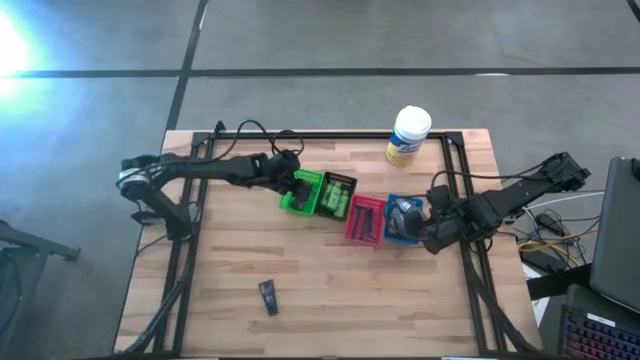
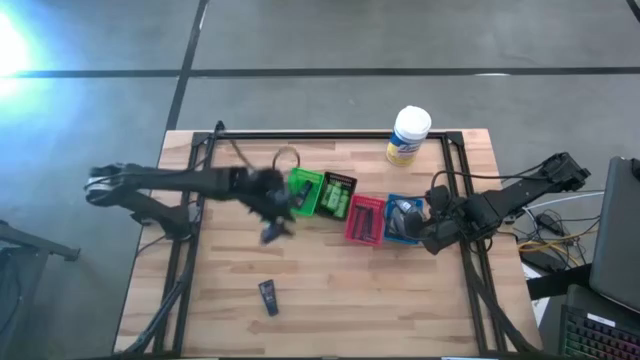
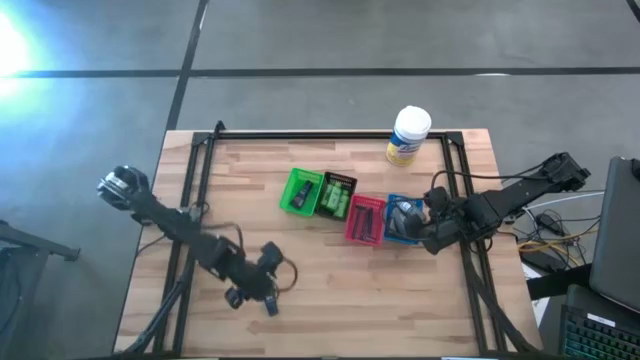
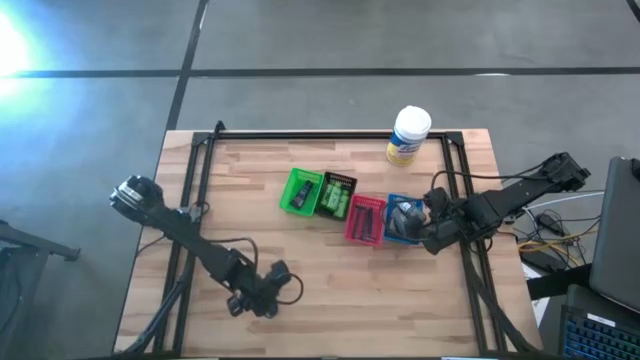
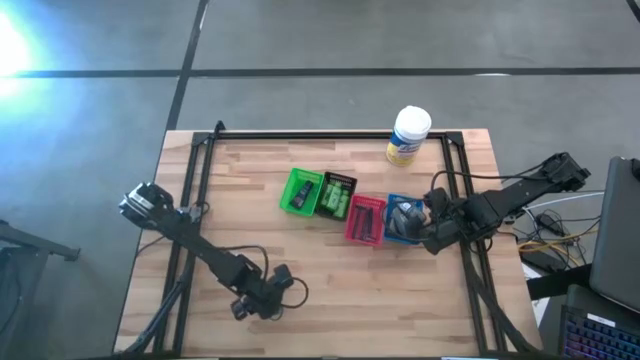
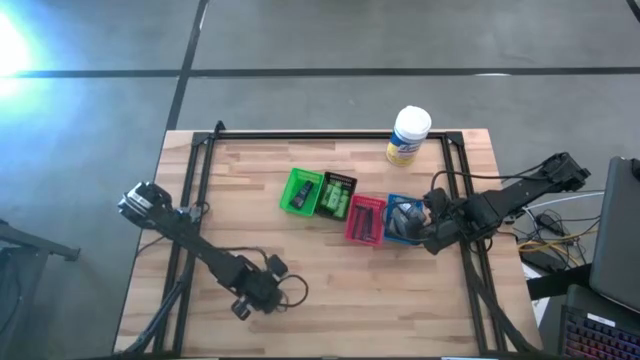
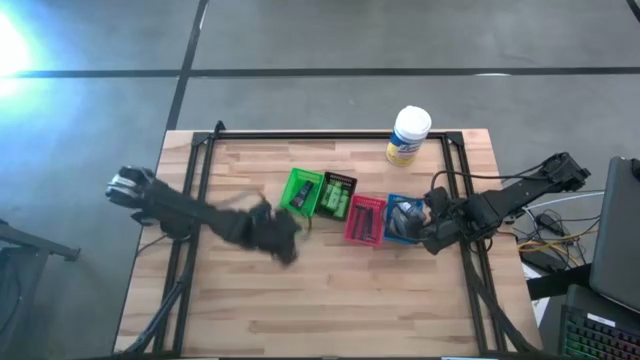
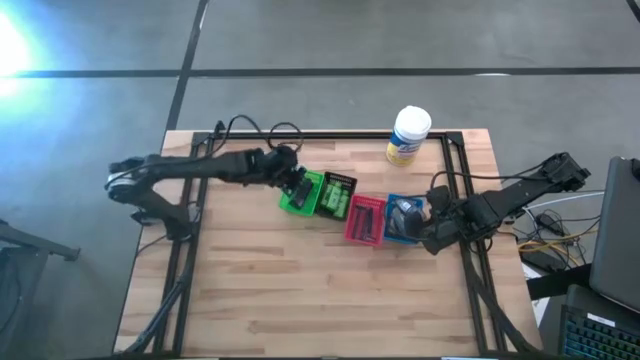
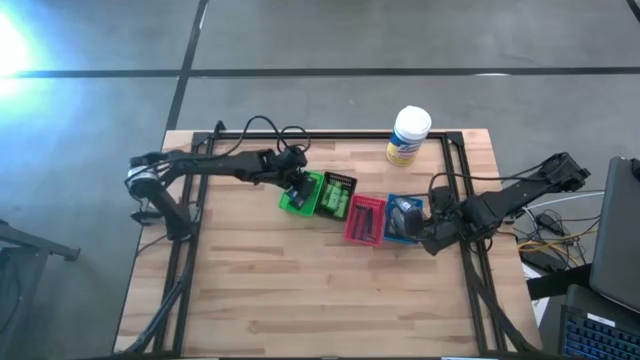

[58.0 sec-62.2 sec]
Task: Pick & Place Travel size toiletries
Put the shave cream into the green bin

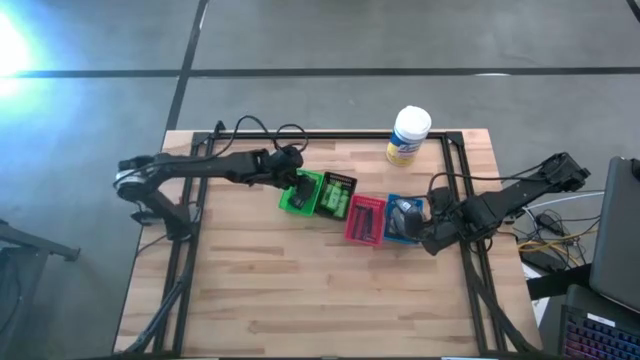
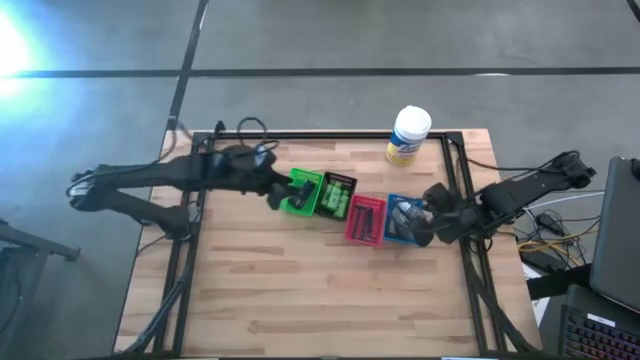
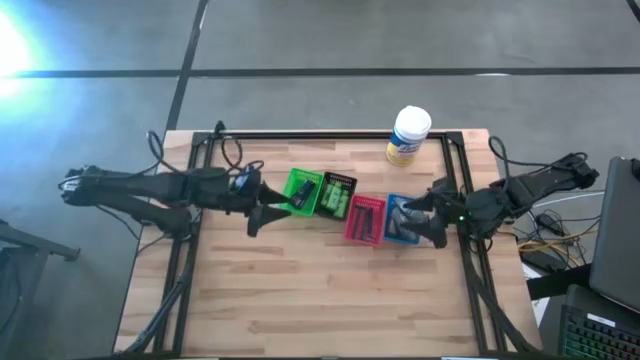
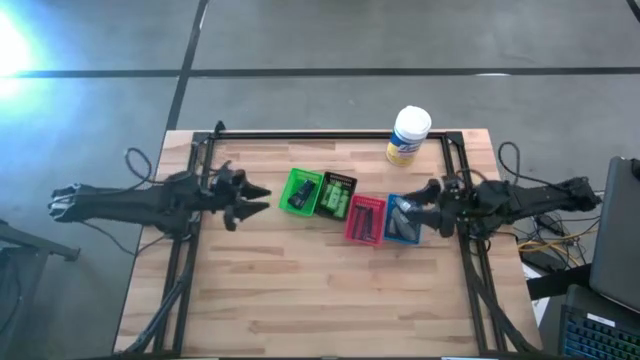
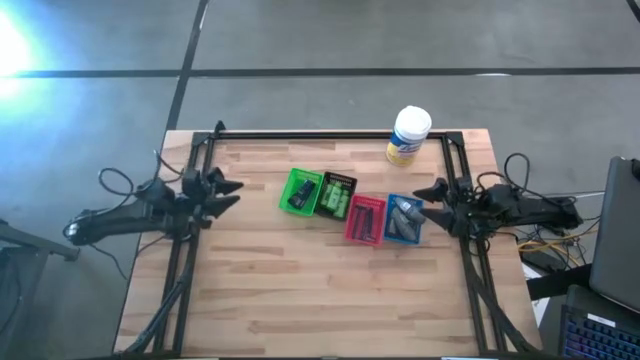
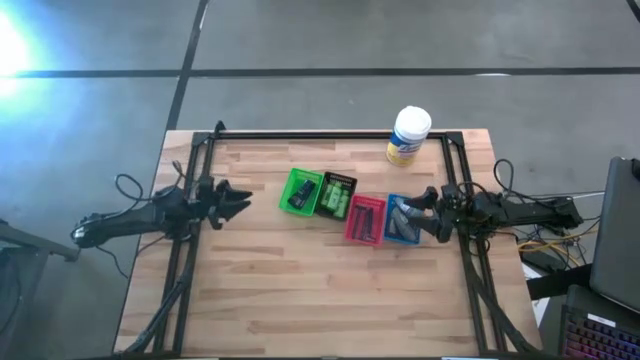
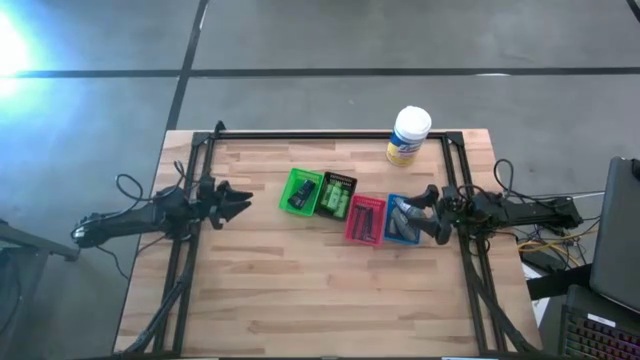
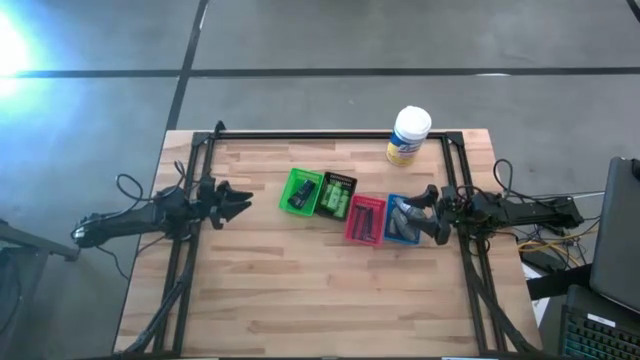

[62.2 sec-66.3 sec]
Return to Home Position

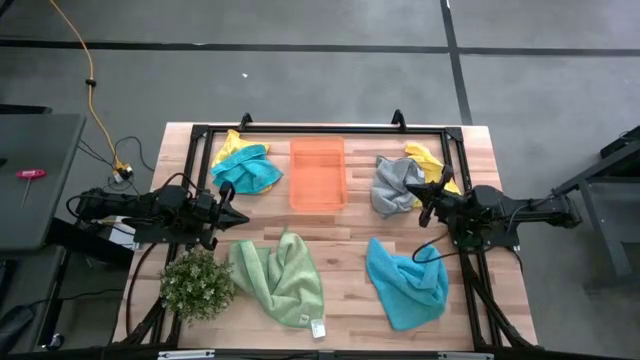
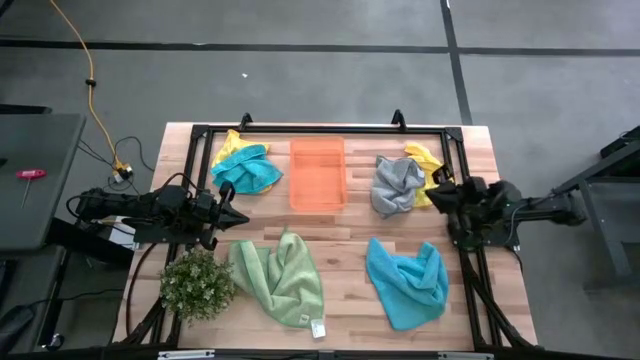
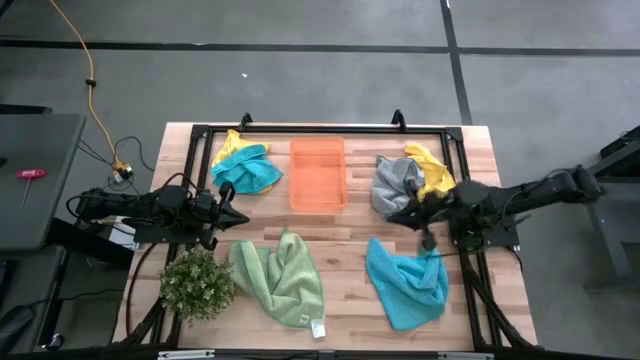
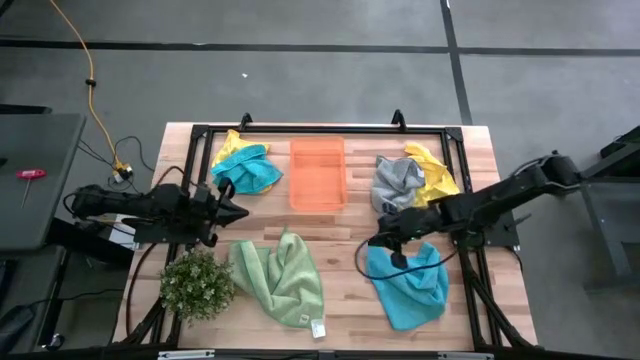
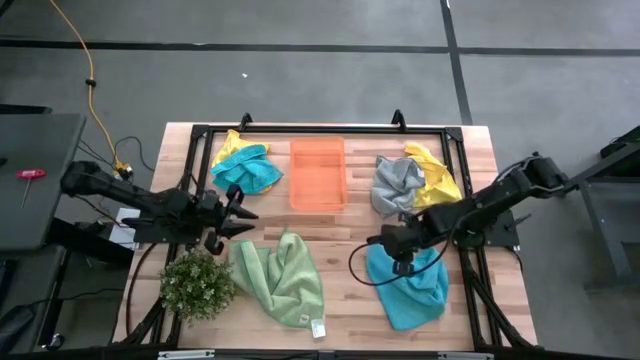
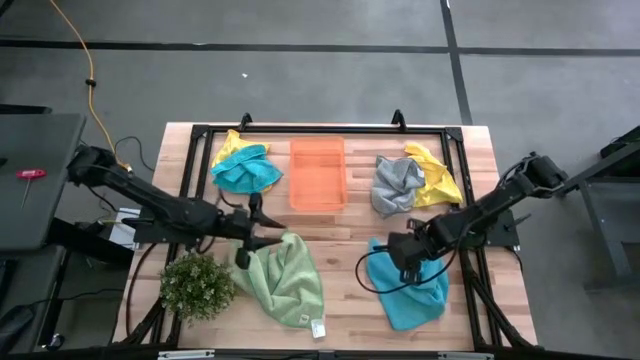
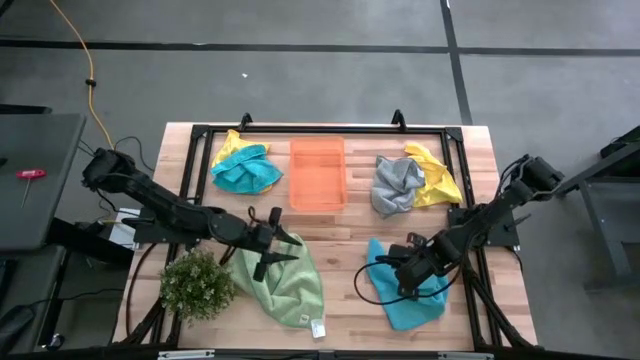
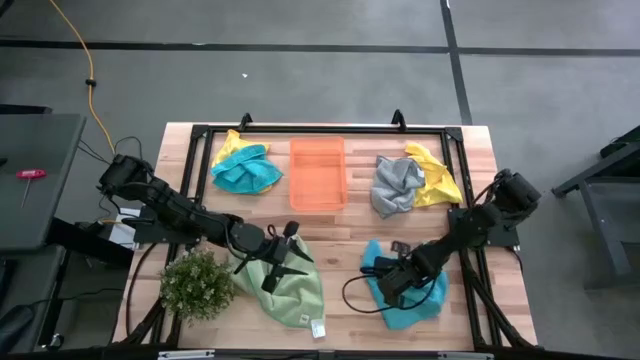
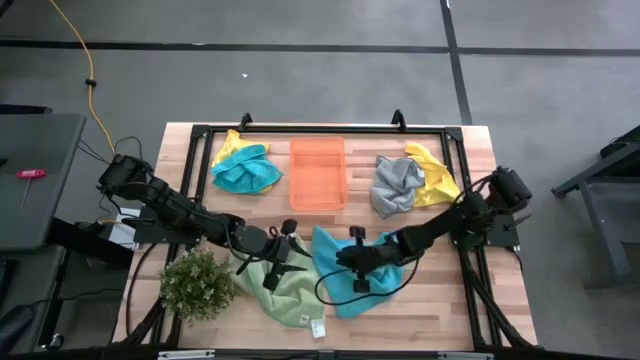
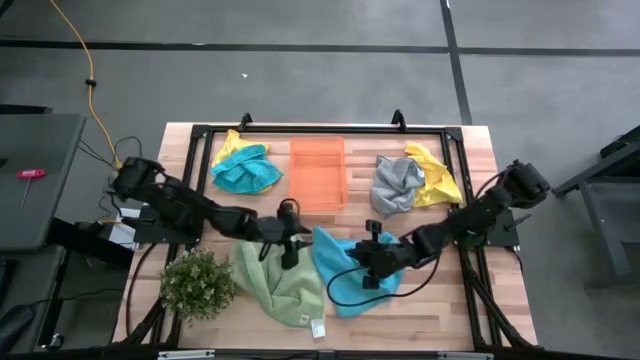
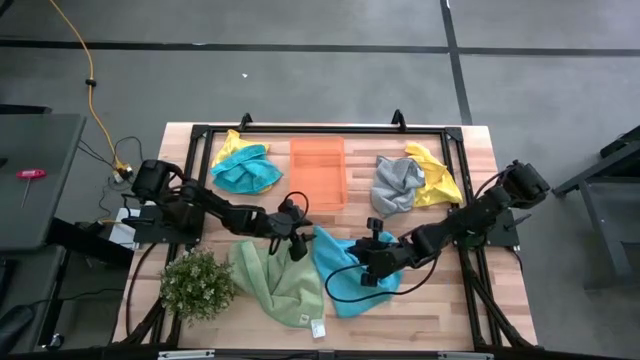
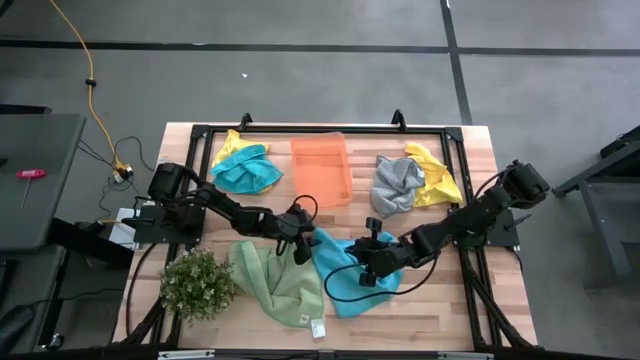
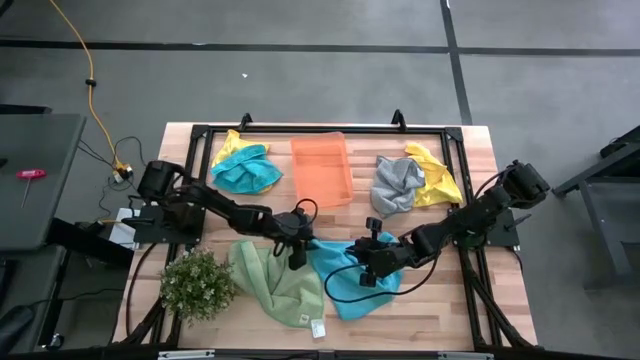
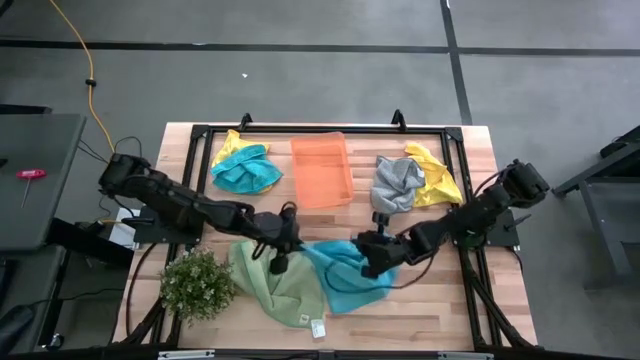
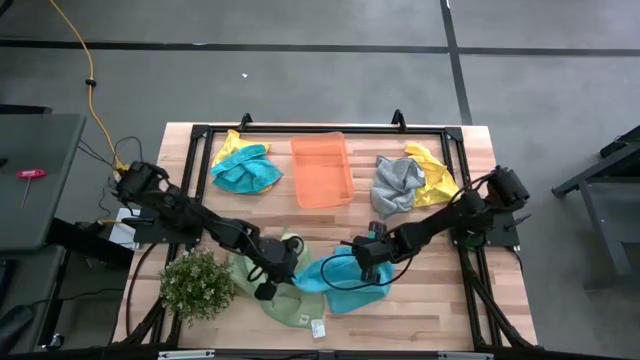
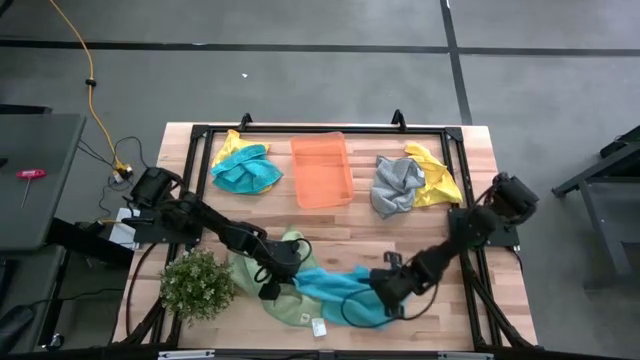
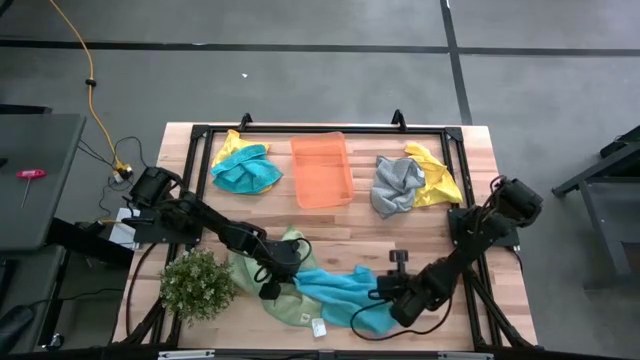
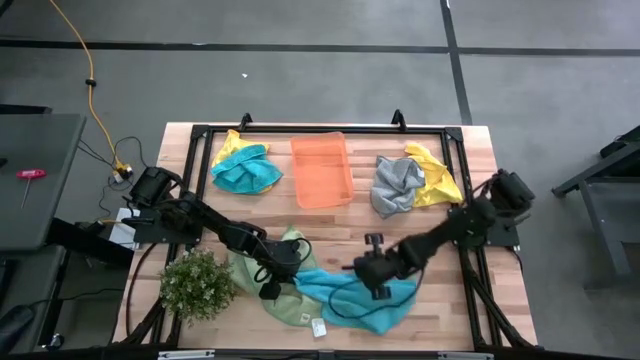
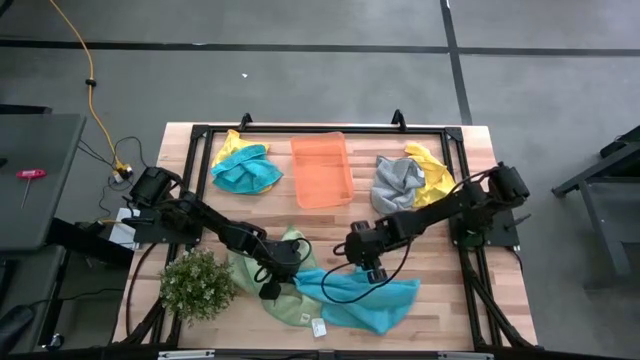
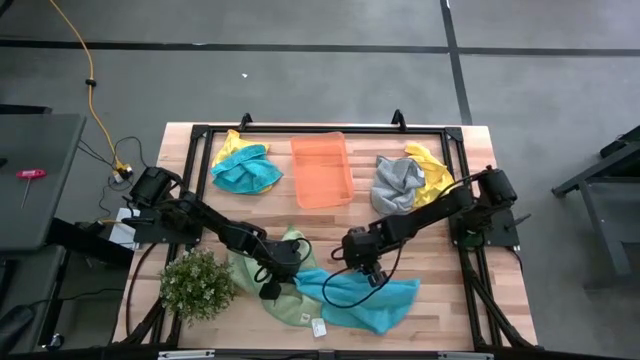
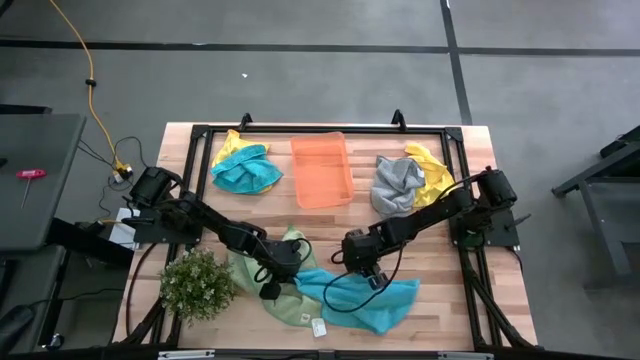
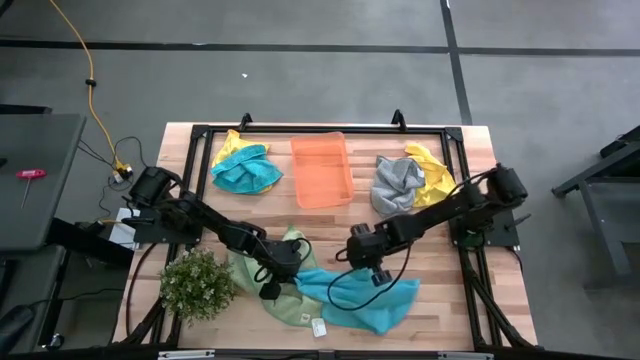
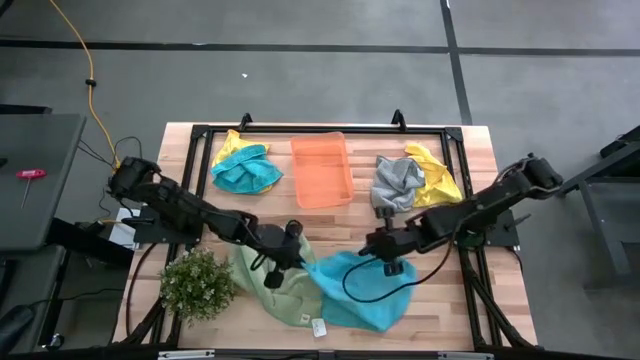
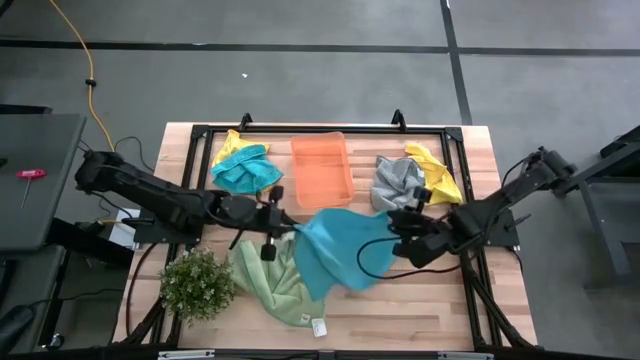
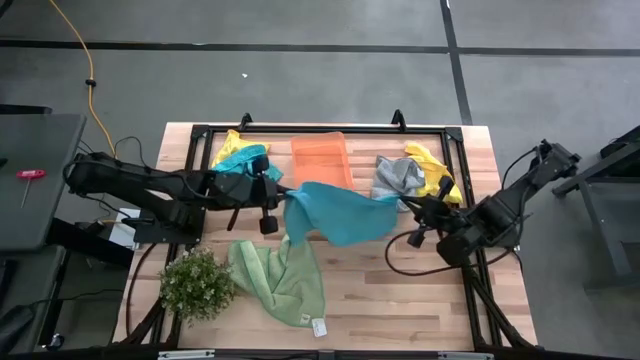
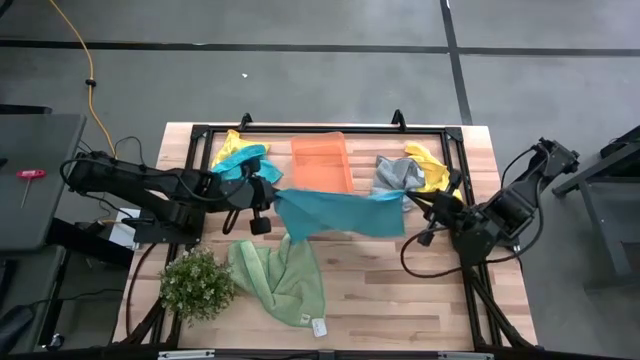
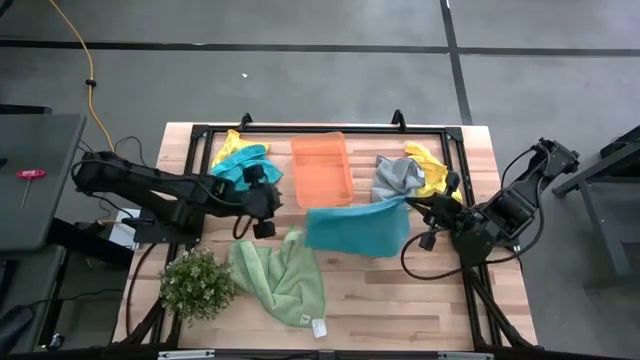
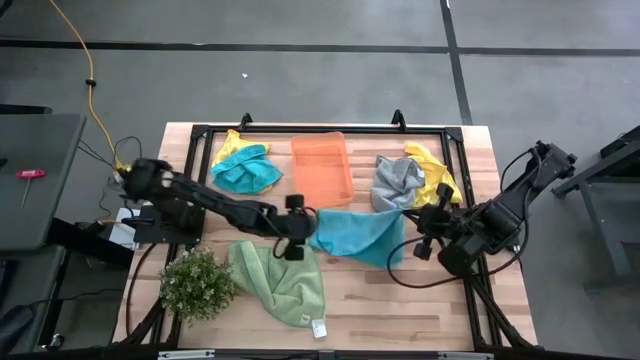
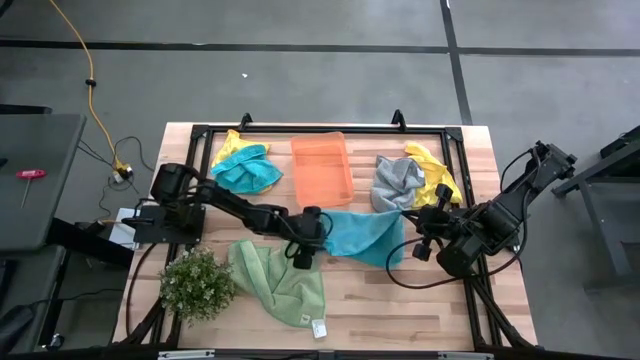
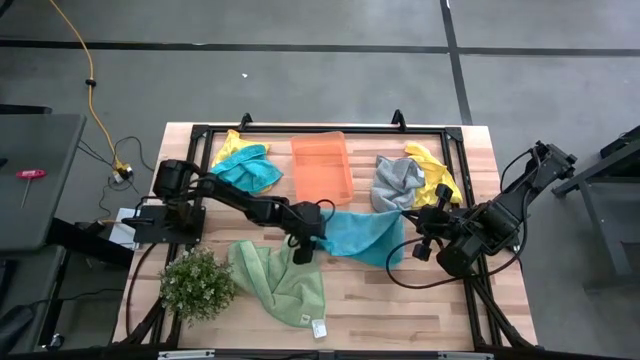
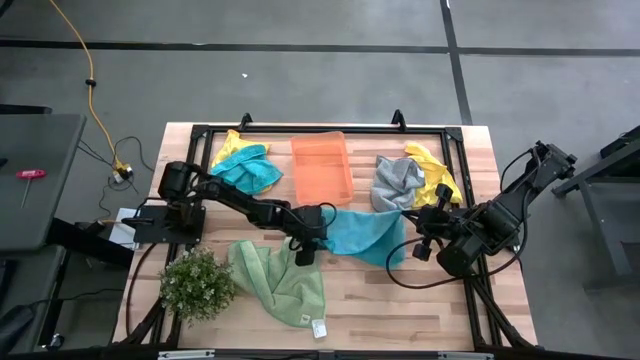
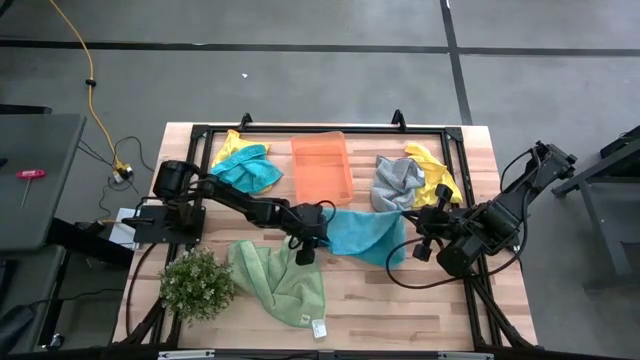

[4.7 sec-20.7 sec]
Task: Fold microfiber towels
Fold the bottom blue microfiber cloth
